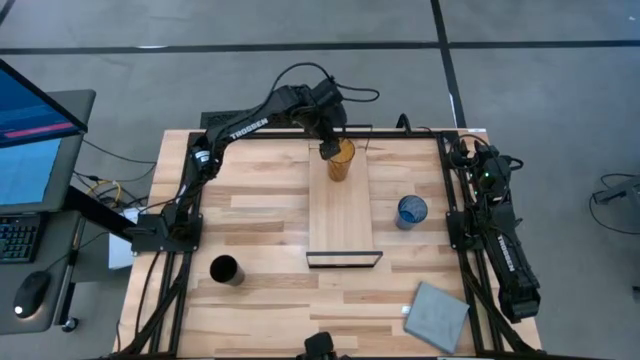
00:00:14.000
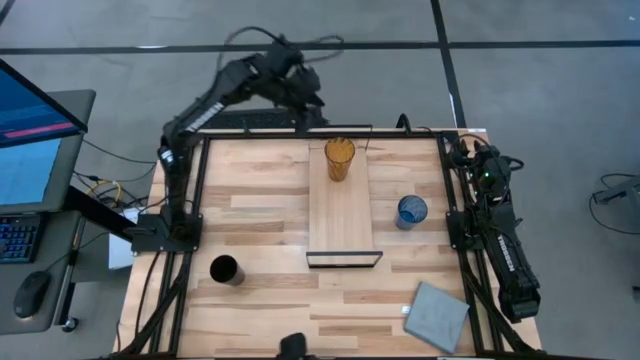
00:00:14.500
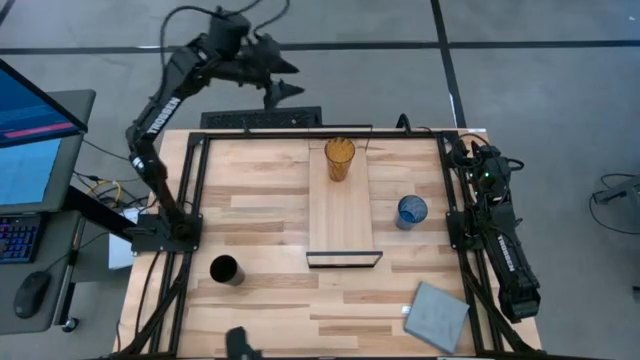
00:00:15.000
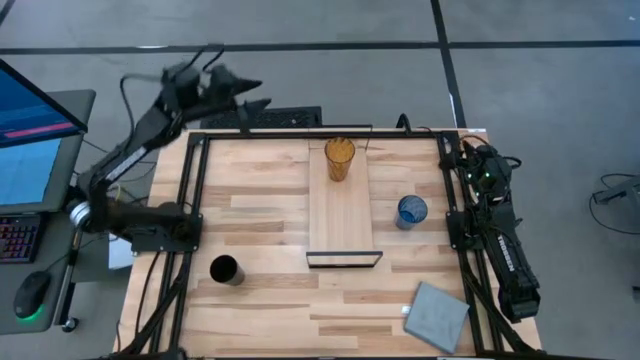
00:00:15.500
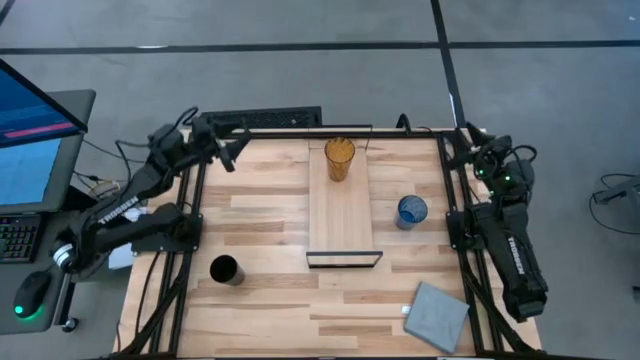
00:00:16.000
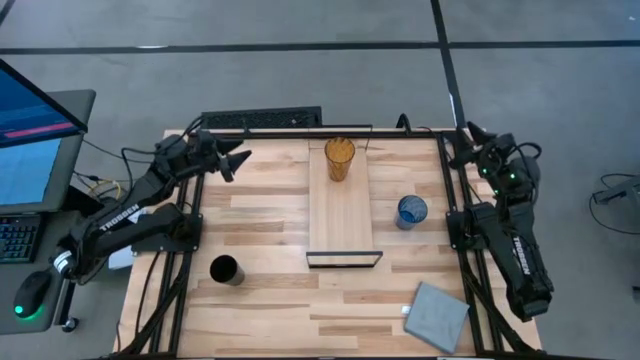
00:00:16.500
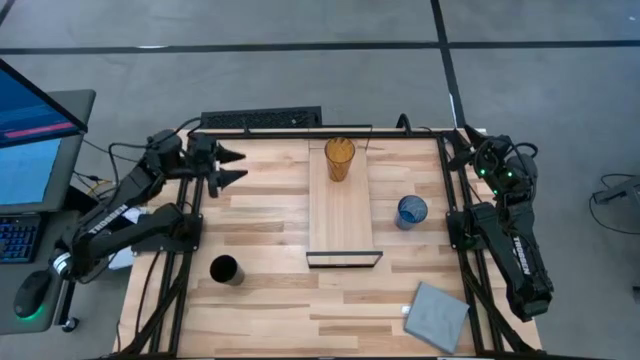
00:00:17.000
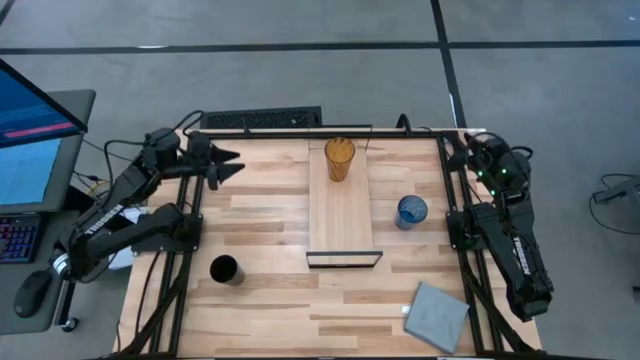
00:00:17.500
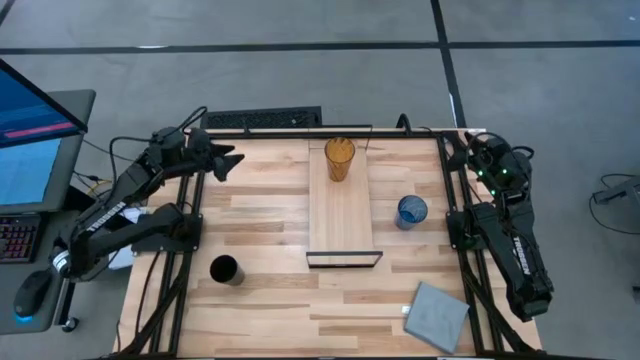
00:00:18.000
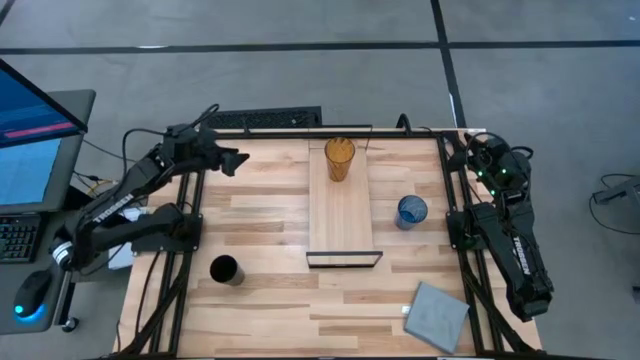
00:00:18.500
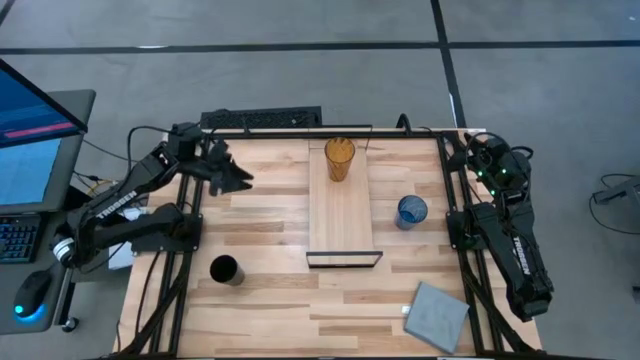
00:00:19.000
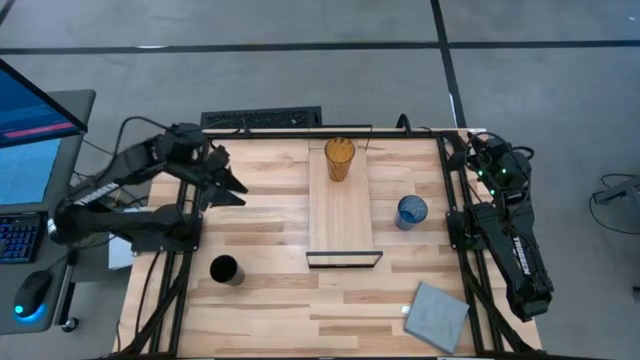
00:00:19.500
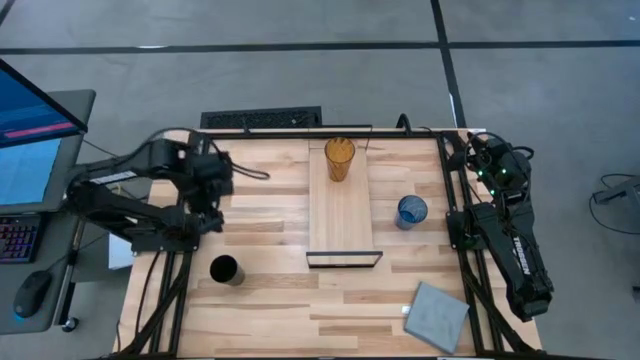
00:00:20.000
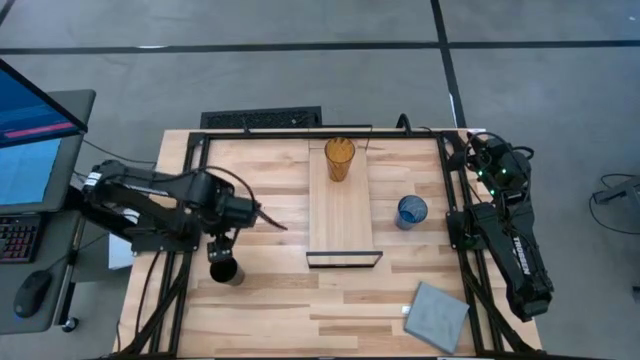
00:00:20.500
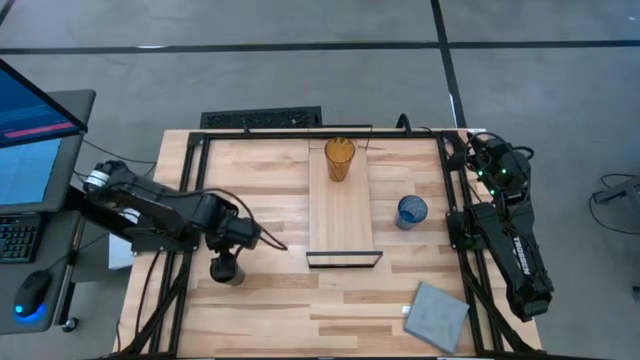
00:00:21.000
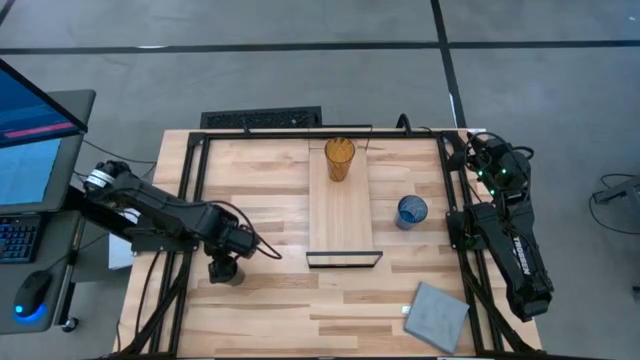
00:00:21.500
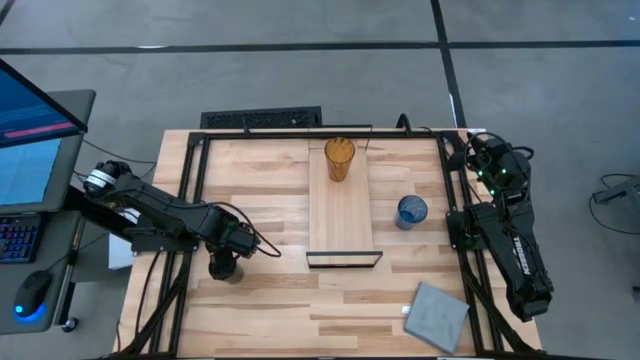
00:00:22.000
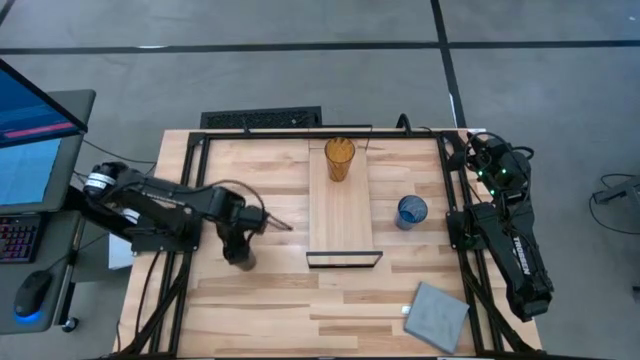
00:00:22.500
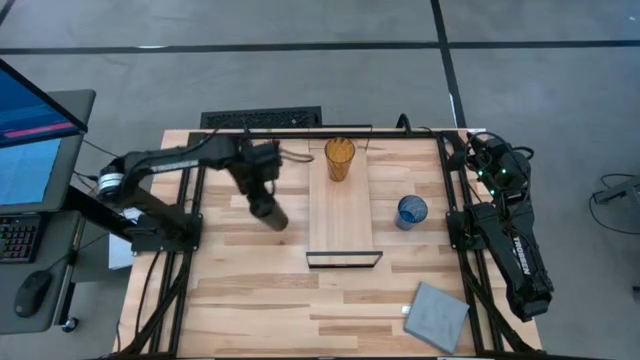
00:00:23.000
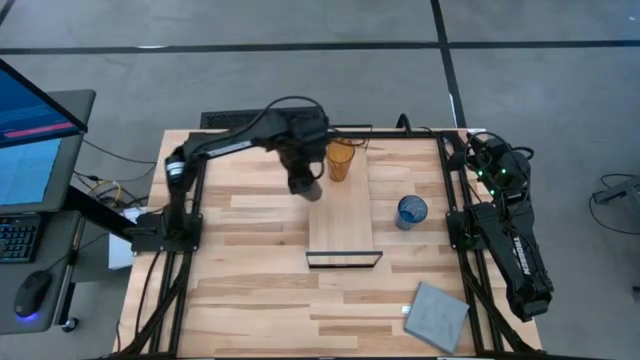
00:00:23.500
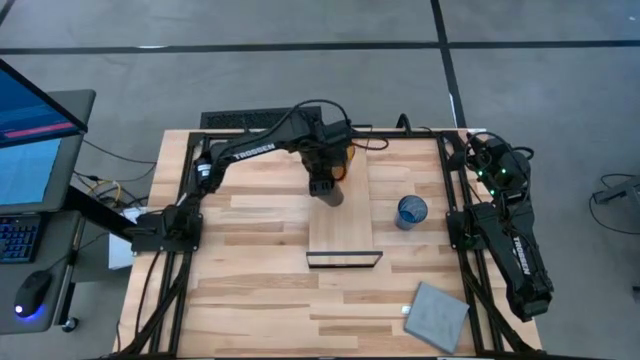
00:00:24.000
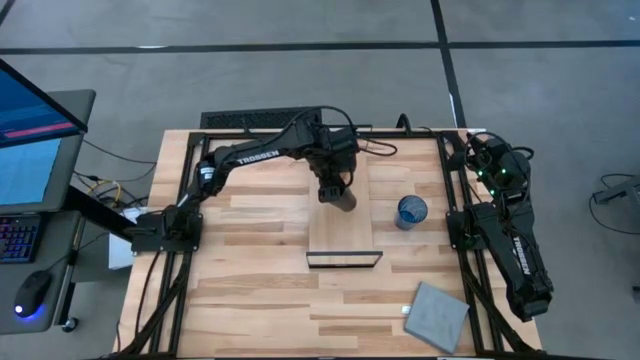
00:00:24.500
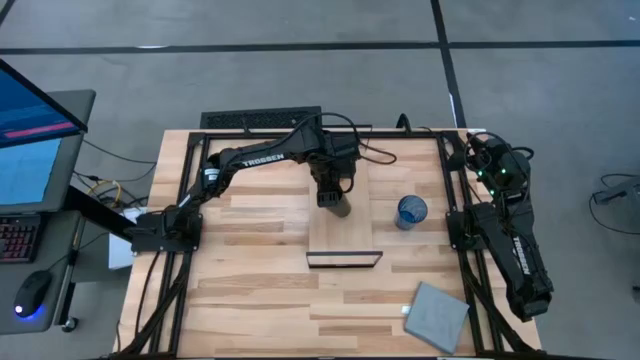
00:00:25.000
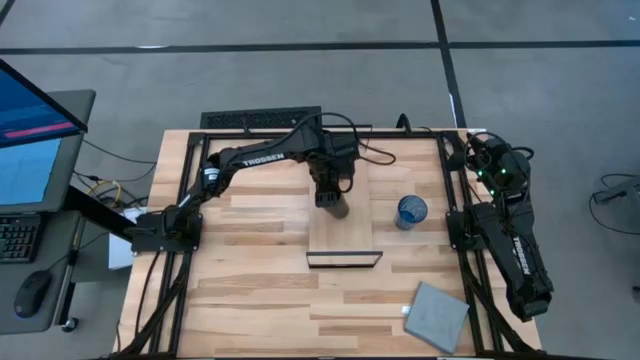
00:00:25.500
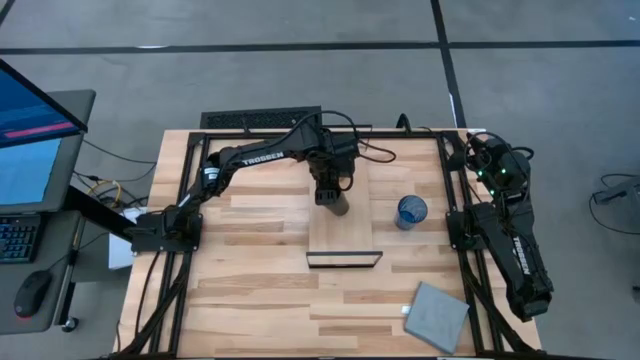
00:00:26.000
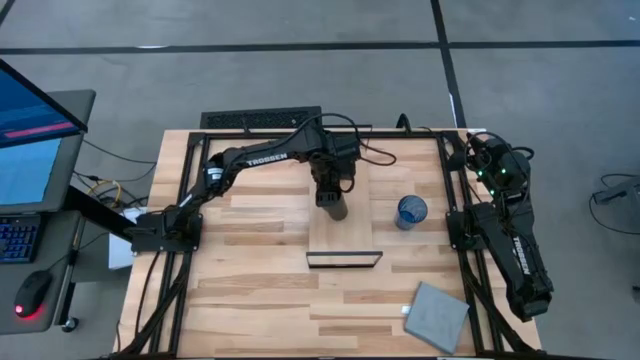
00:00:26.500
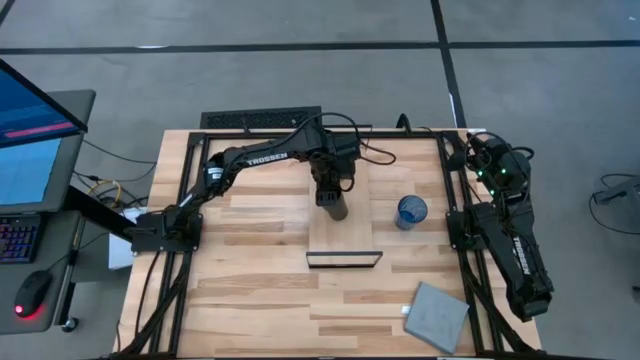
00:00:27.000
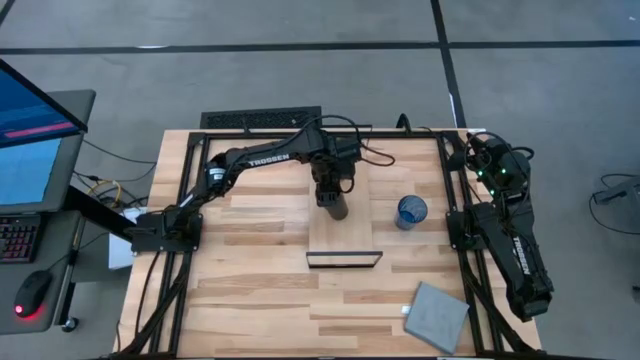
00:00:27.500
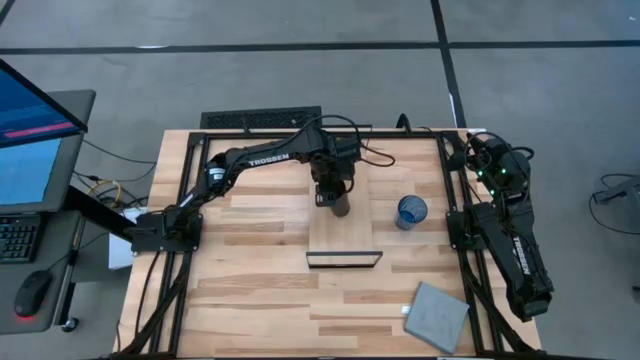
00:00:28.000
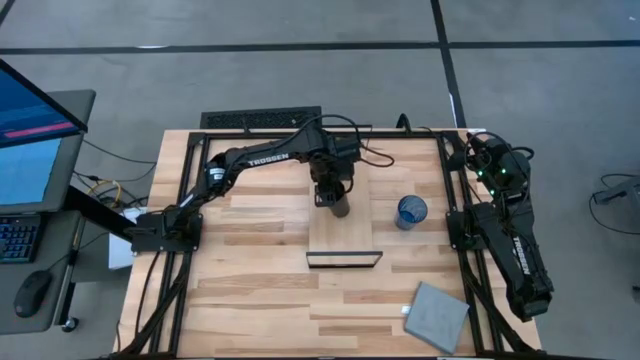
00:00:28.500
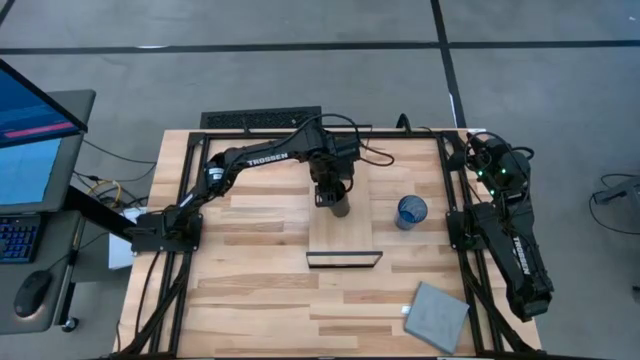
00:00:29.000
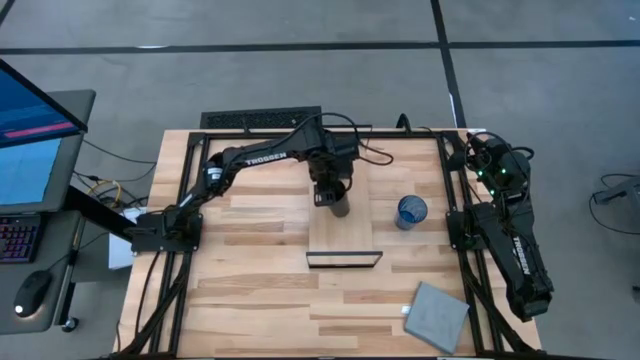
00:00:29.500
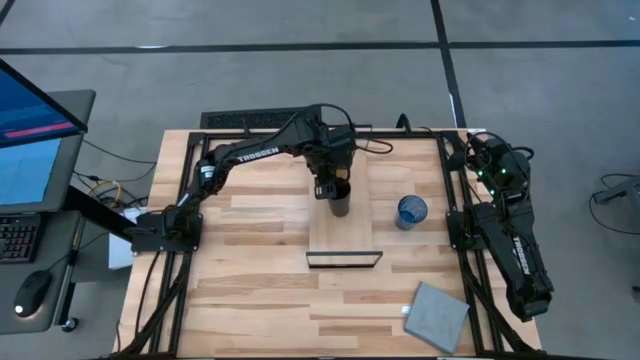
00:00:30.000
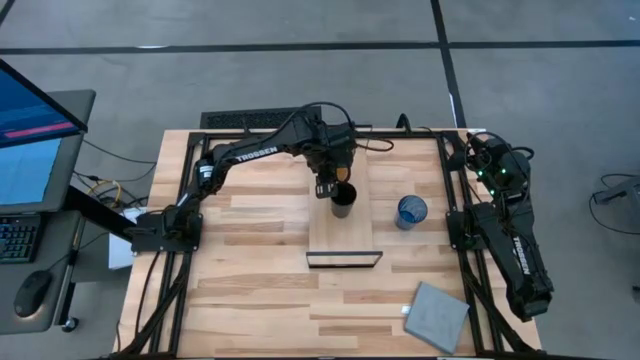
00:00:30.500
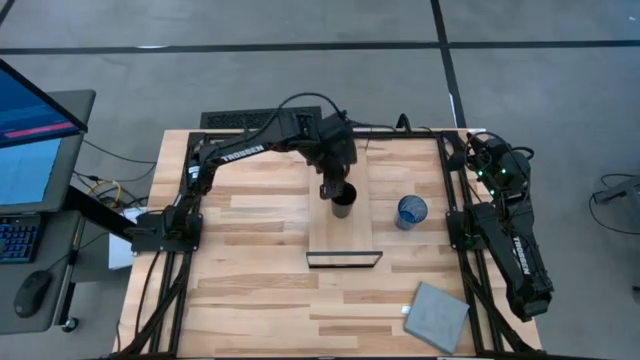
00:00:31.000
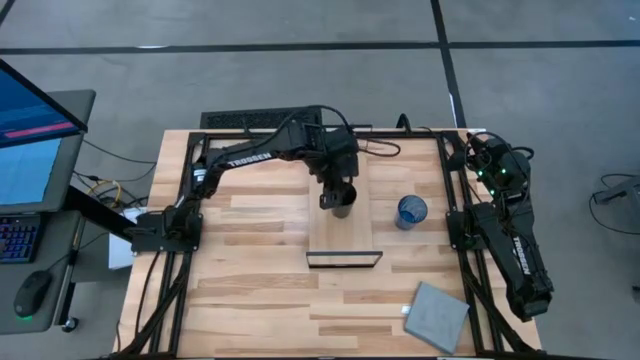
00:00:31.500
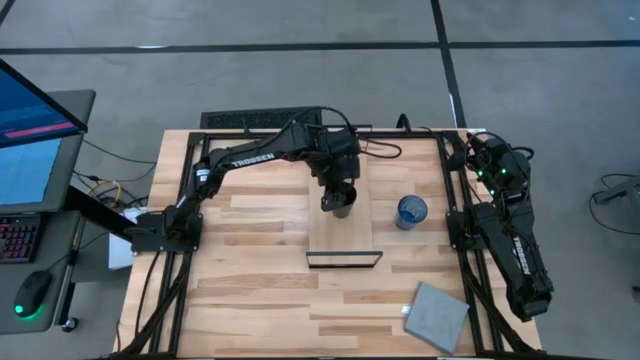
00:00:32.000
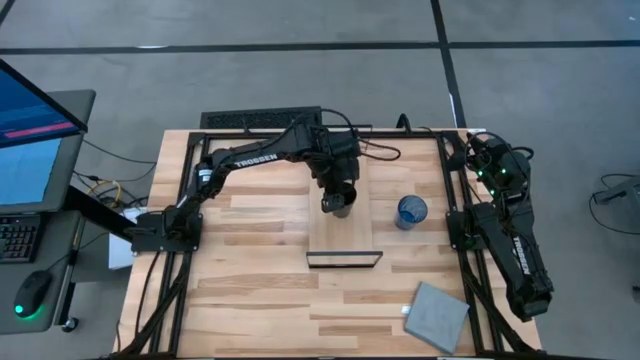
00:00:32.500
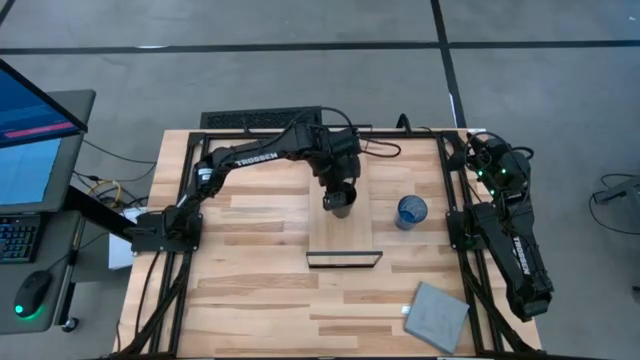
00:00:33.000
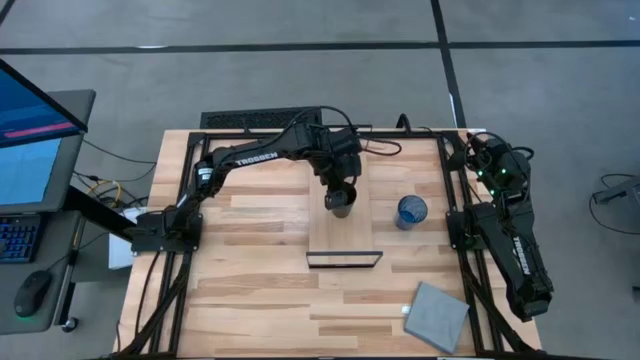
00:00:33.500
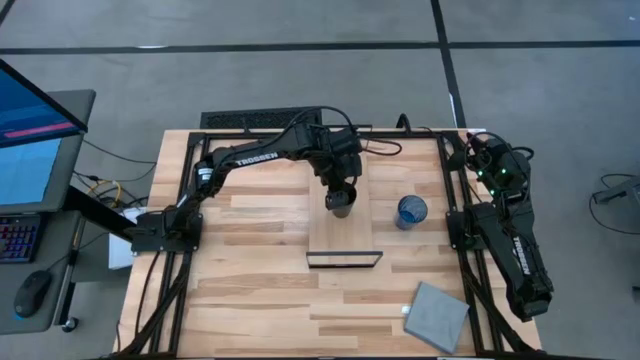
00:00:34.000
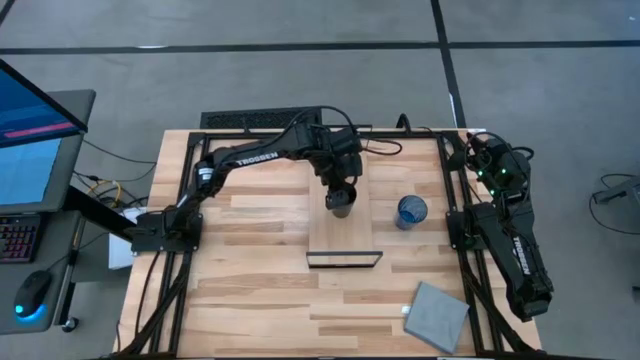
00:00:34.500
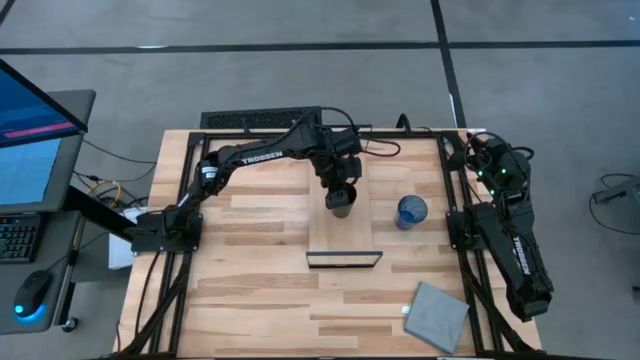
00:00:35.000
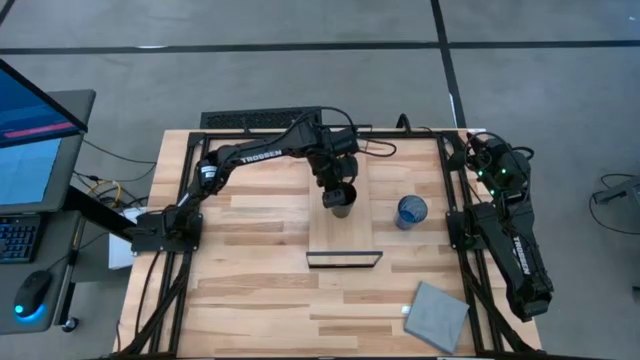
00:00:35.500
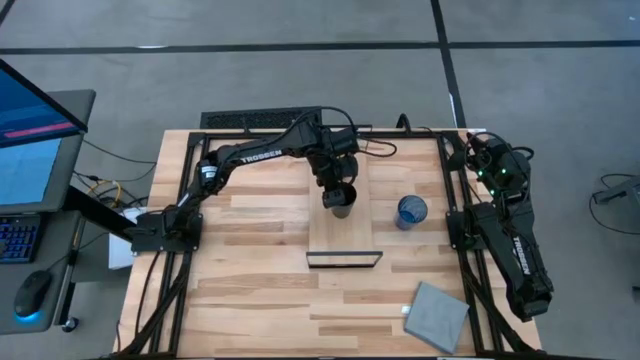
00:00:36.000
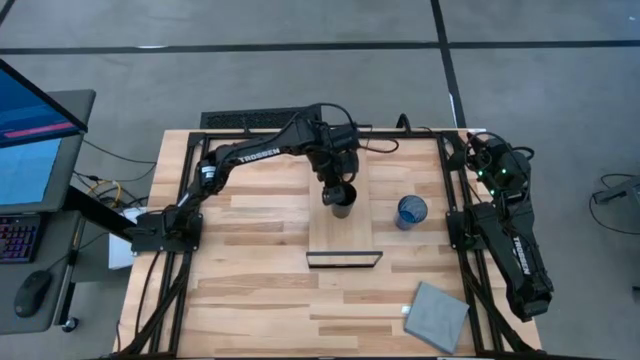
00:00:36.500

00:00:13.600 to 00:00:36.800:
Task: Stack small to large cups/mugs on shelf
Put the black cup on the shelf
